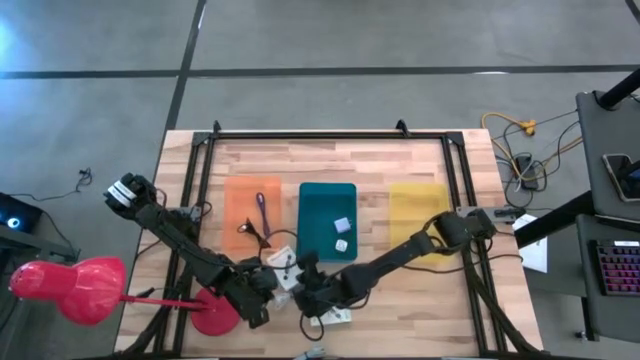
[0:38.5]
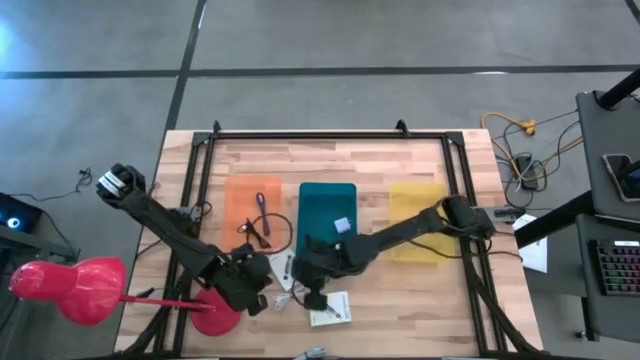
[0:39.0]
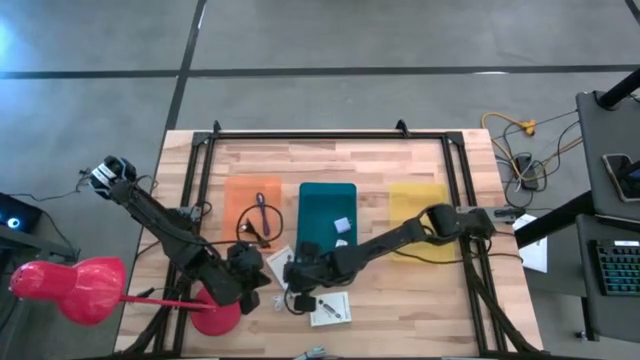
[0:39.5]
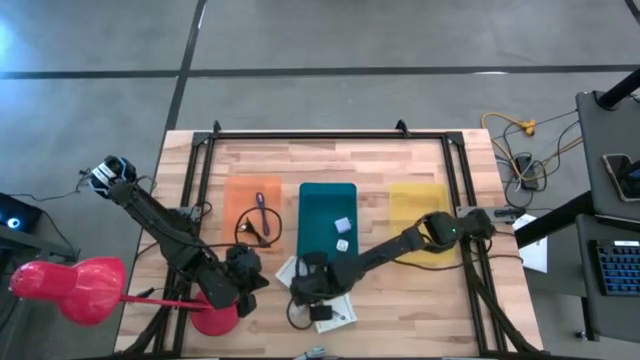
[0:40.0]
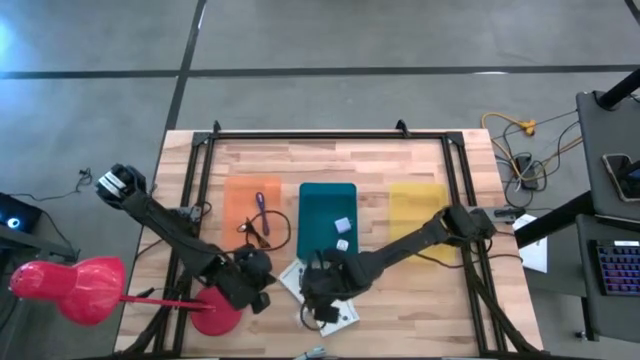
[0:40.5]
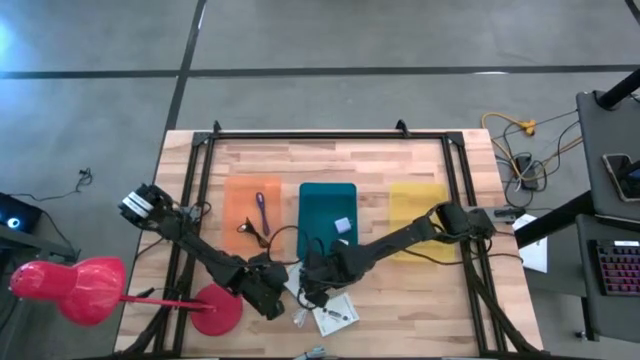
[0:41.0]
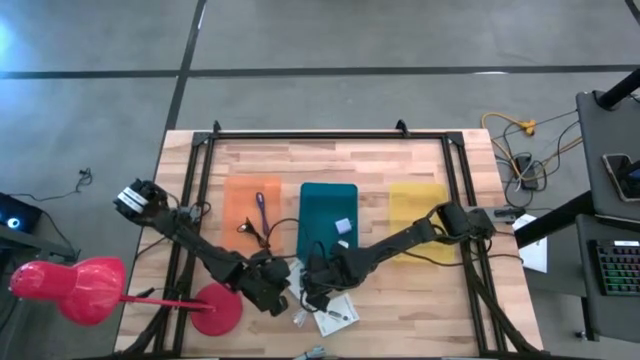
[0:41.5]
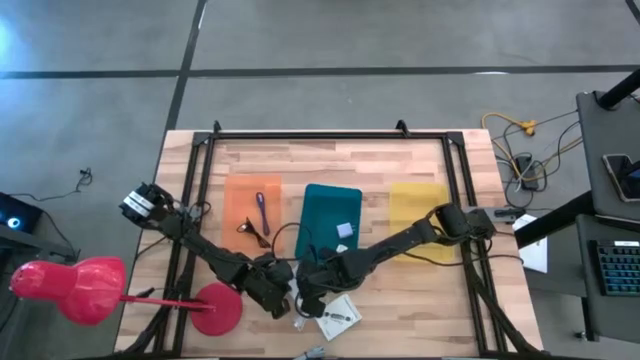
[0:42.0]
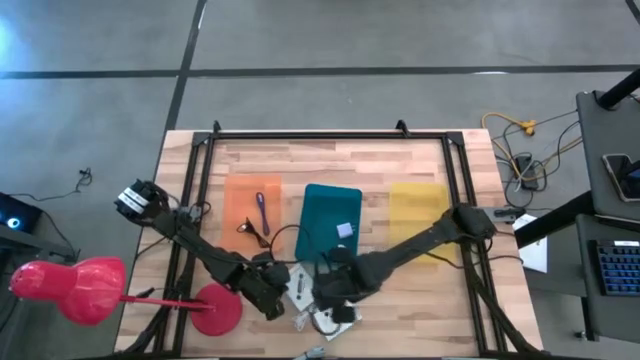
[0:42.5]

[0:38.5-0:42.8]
Task: Pick and place items into bin
Adjust the card reader box on the table

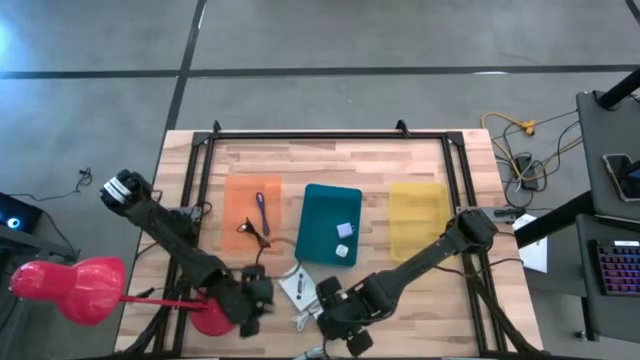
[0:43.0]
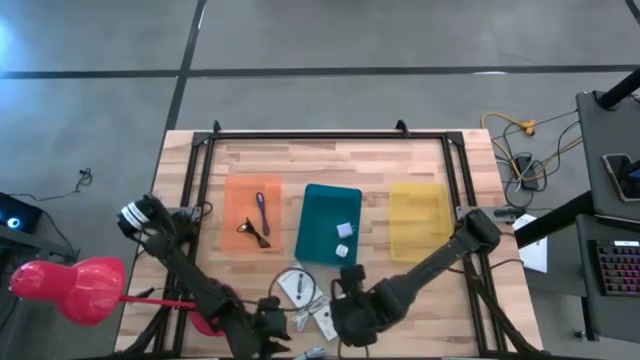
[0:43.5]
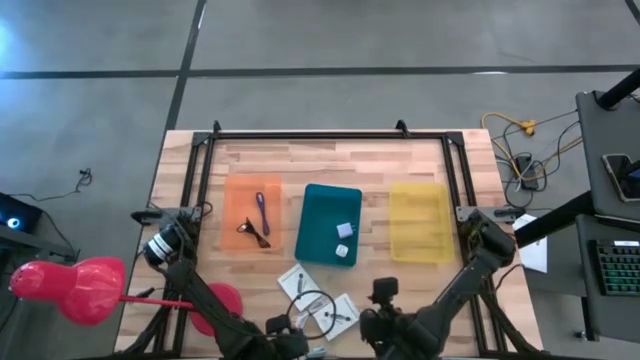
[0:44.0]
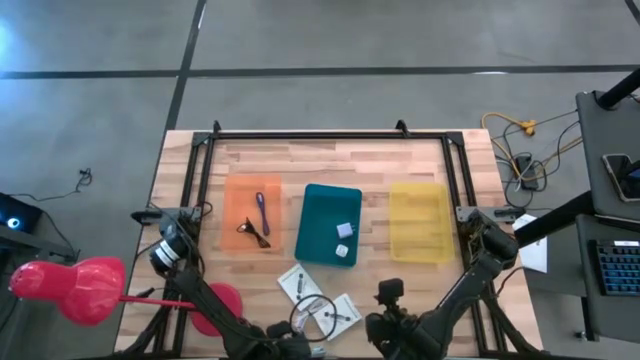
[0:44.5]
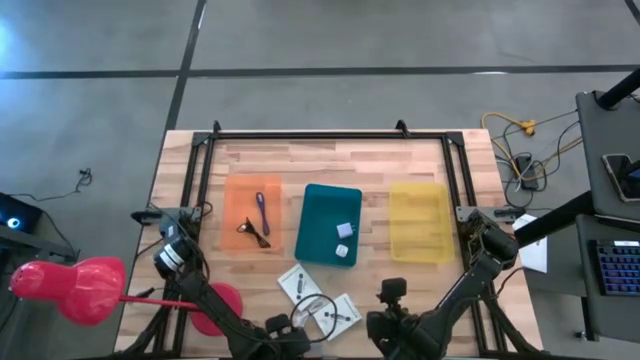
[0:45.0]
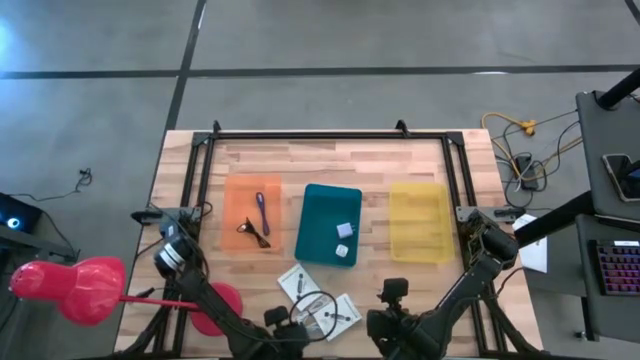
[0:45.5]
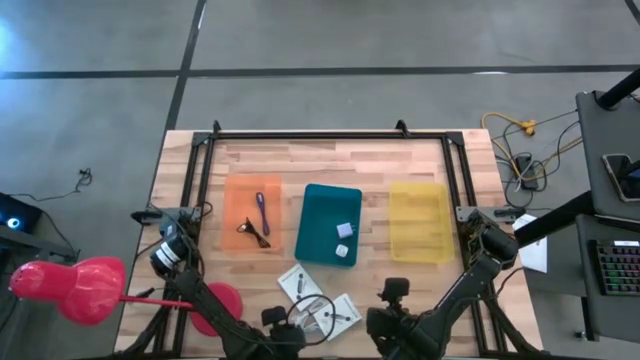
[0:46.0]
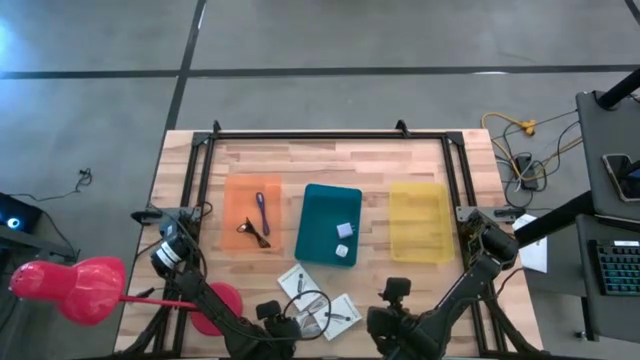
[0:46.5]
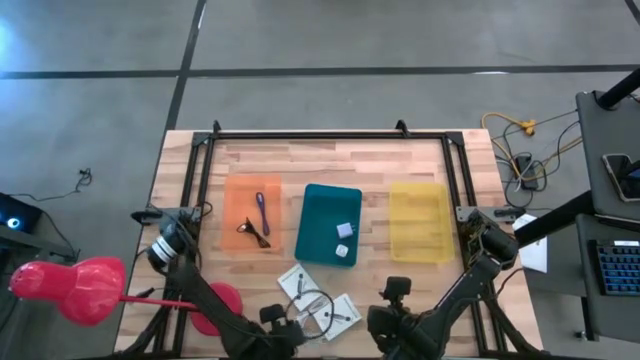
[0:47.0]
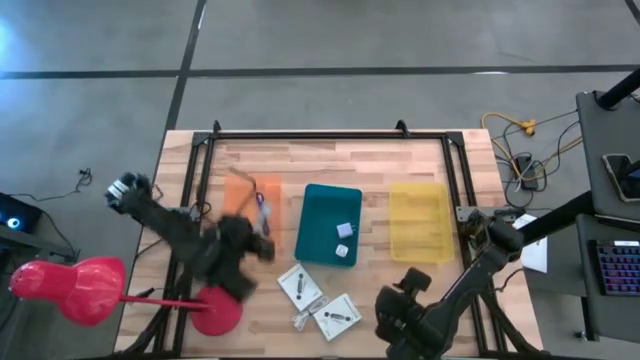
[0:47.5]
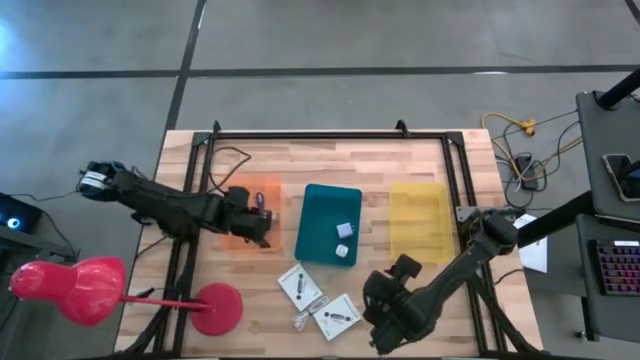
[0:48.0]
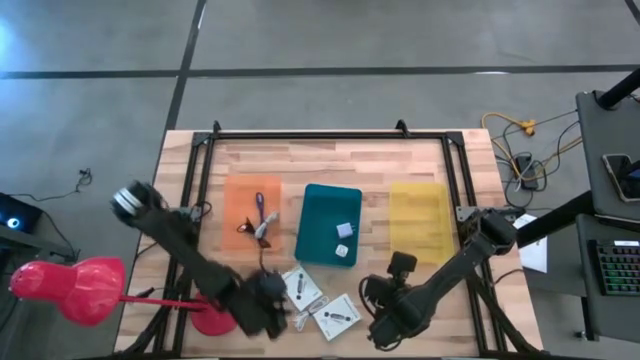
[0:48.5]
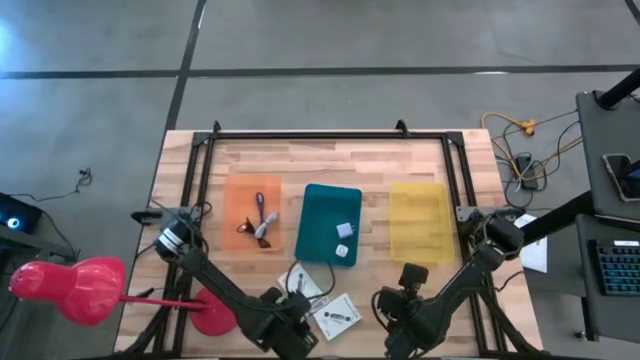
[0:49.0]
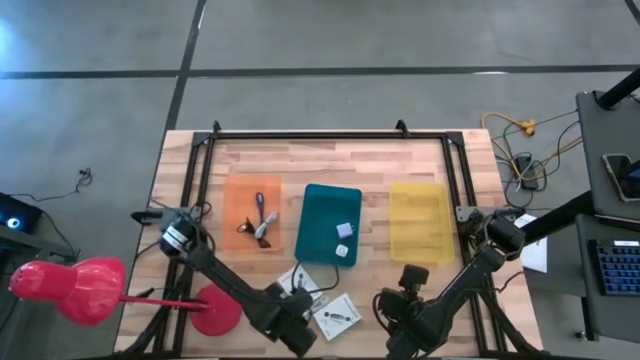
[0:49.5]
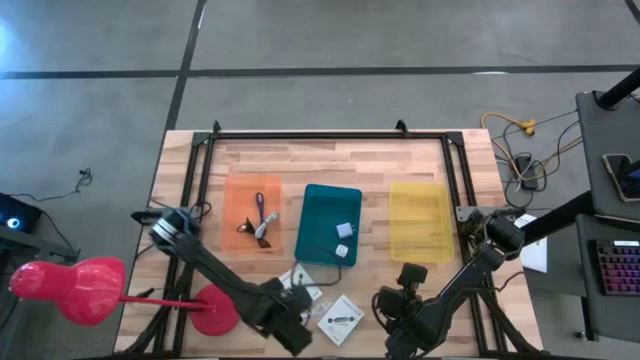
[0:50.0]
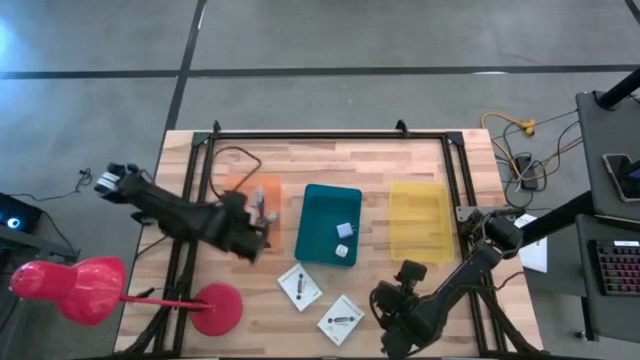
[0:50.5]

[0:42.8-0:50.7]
Put the light blue USB cable wire into the orange bin

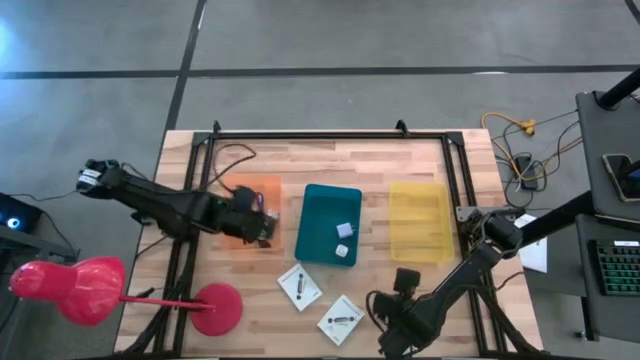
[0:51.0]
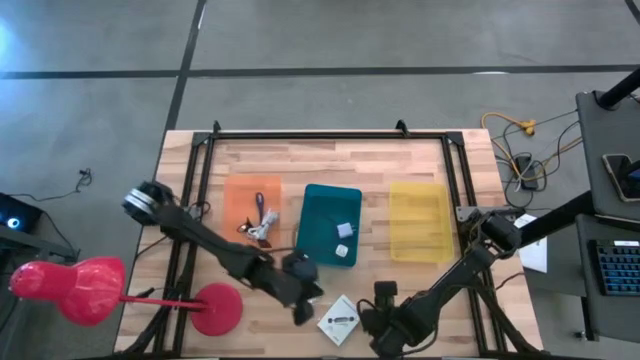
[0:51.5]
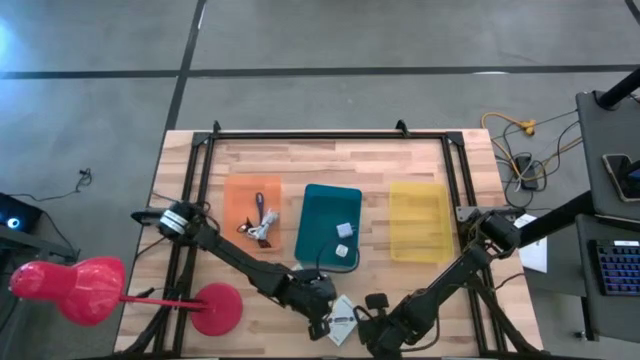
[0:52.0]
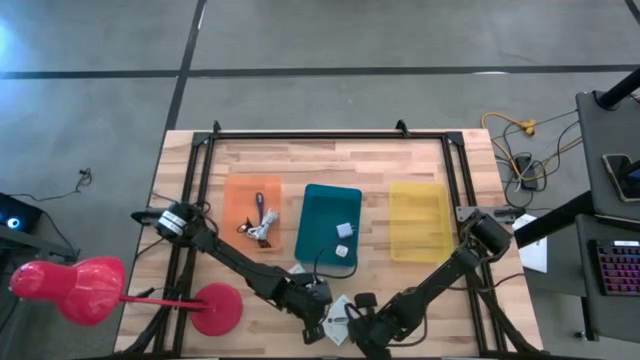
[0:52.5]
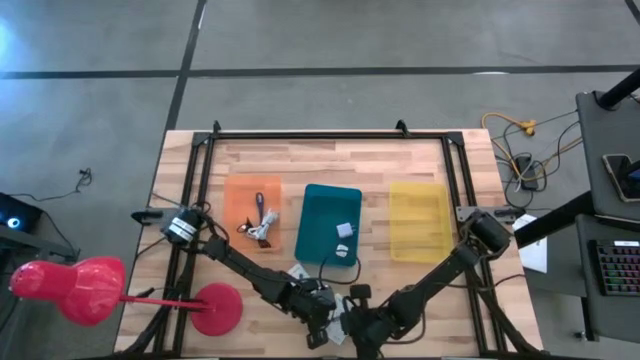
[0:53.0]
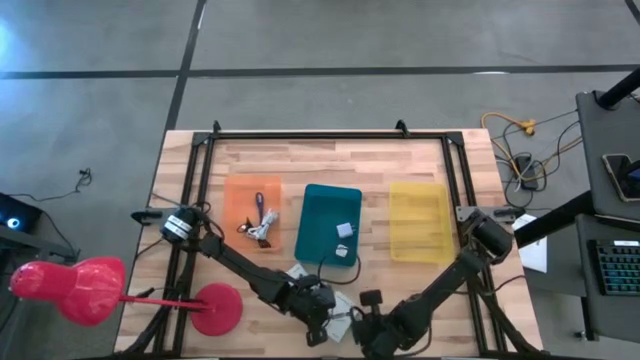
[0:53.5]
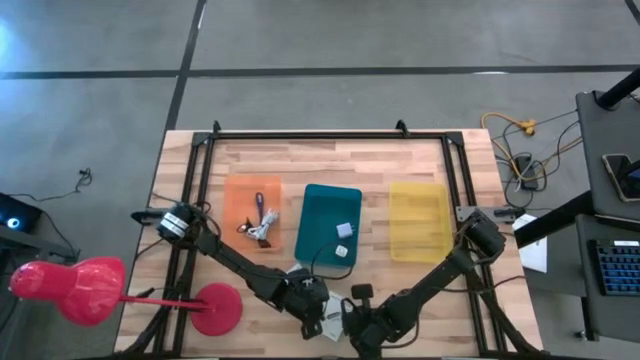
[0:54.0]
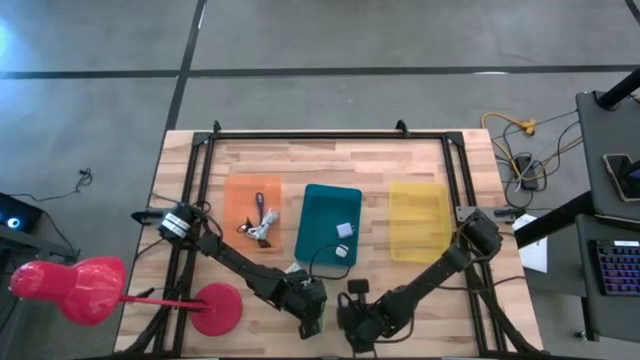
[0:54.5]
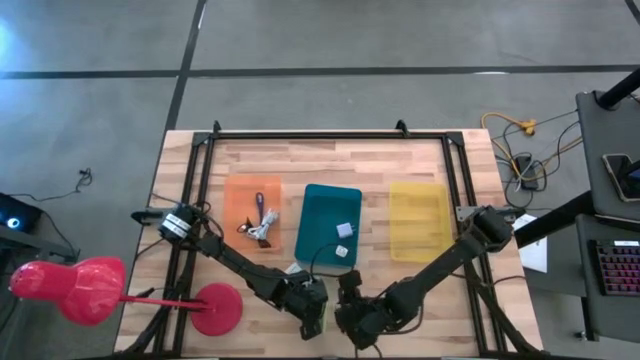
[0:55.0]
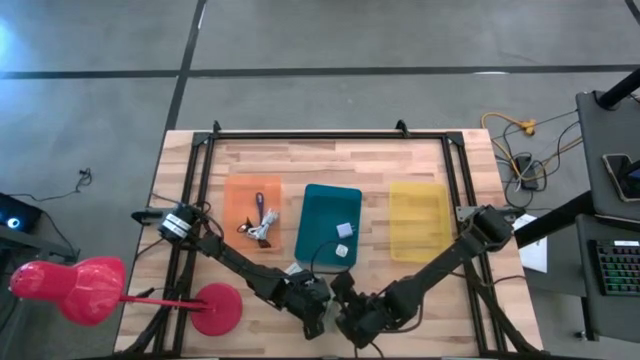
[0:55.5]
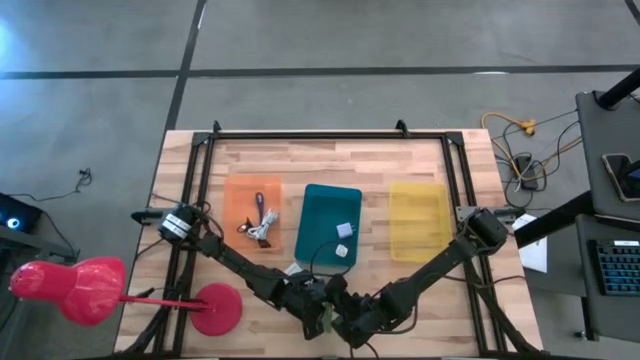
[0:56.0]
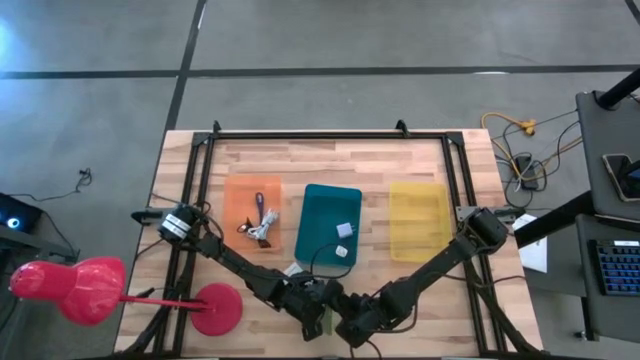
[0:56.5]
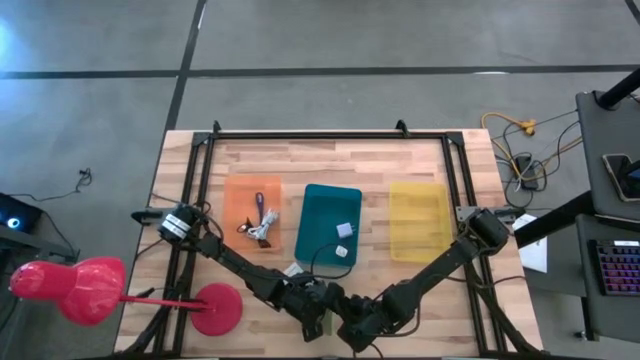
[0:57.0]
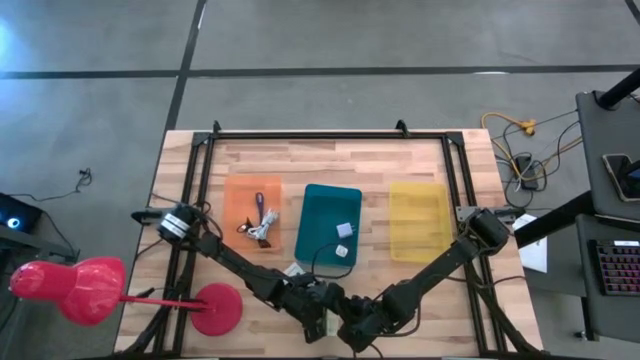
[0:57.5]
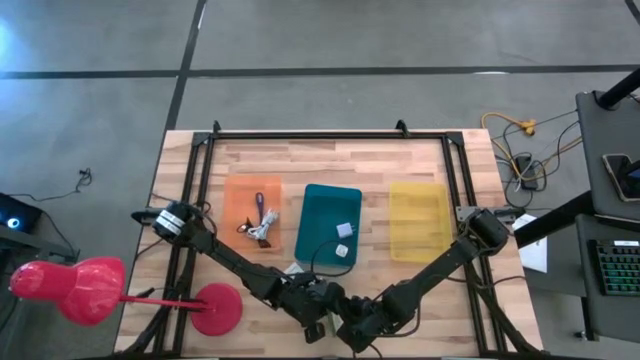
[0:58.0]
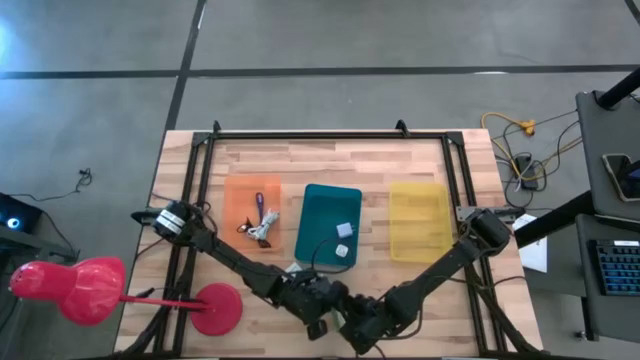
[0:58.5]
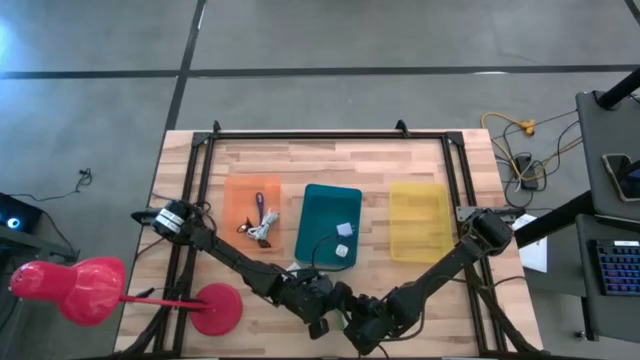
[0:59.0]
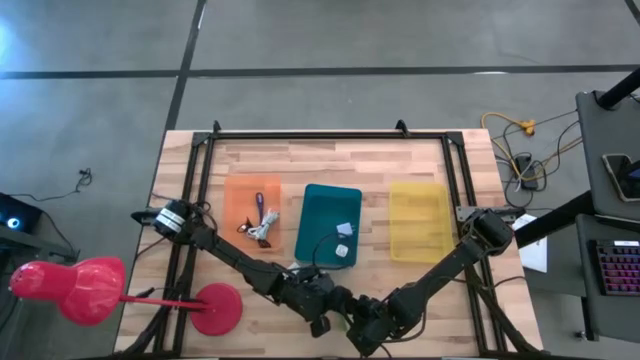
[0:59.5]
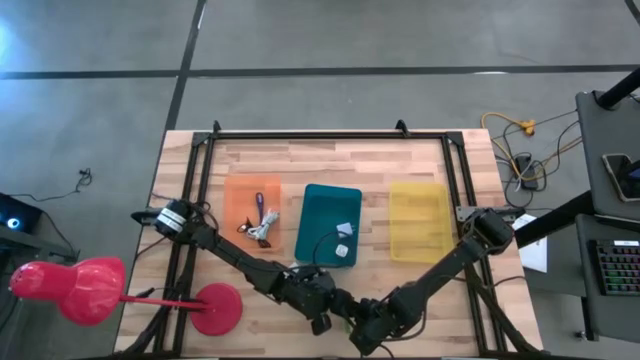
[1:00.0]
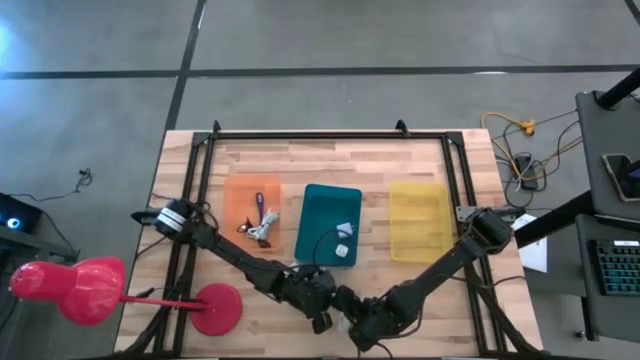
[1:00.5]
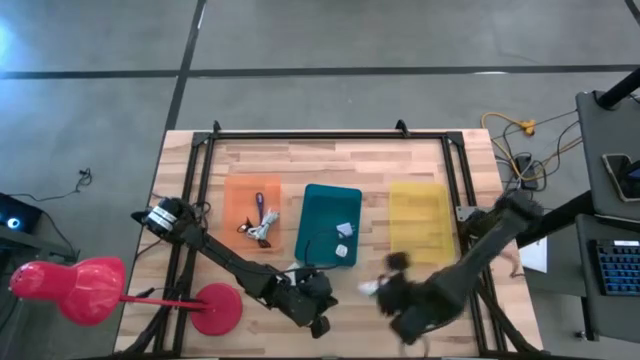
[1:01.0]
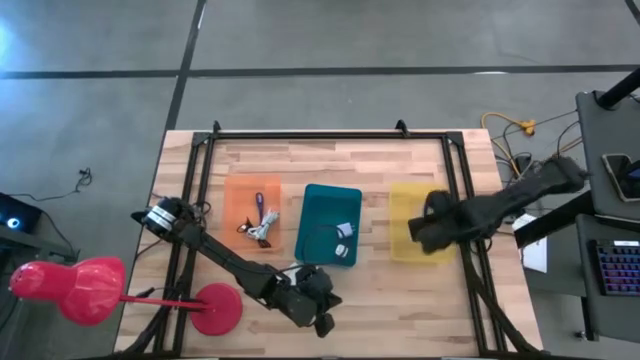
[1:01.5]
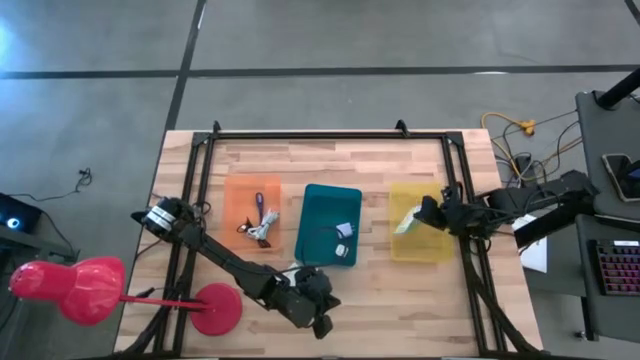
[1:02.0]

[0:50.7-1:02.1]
Put the right card reader box into the yellow bin
